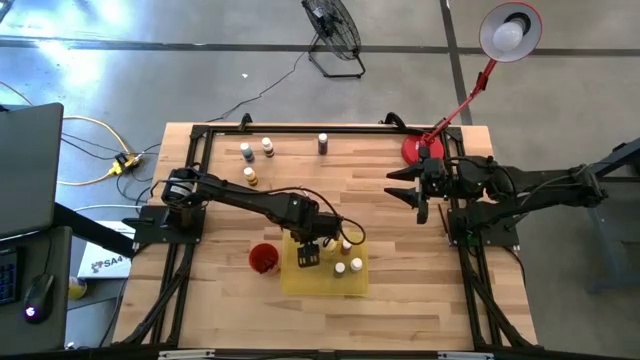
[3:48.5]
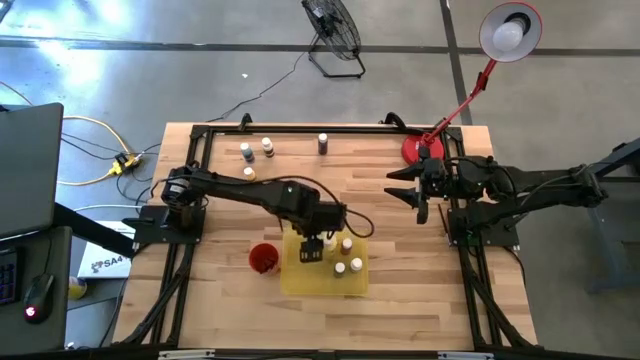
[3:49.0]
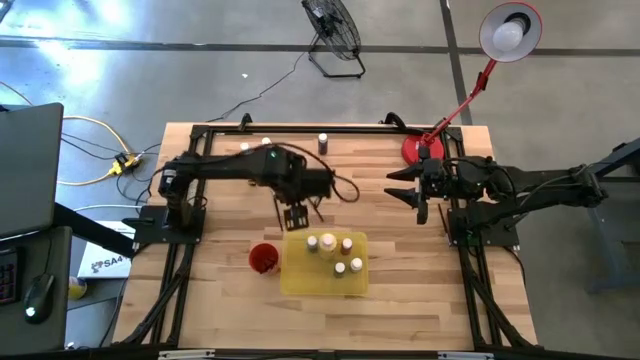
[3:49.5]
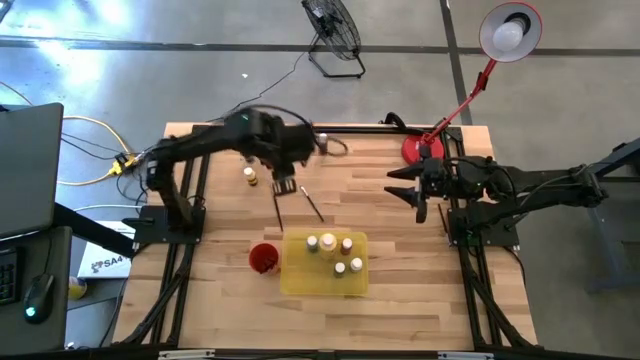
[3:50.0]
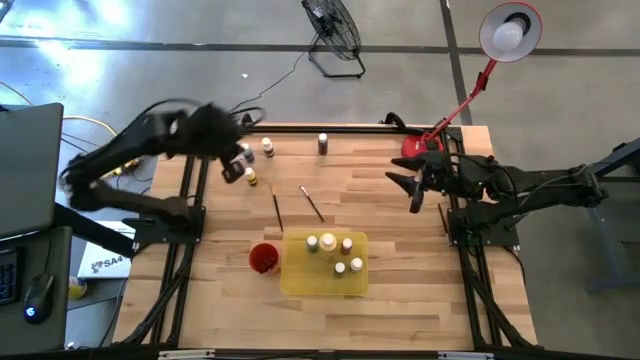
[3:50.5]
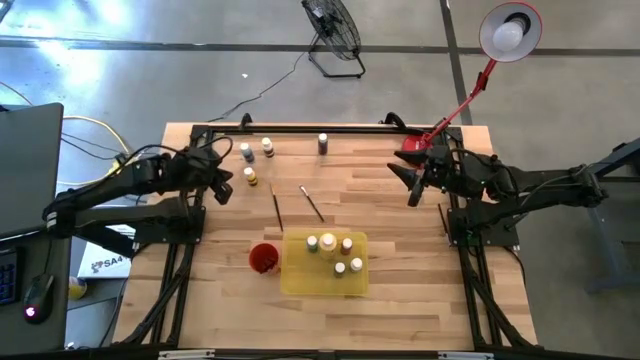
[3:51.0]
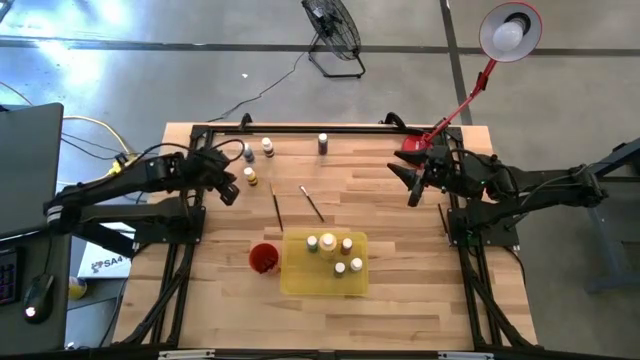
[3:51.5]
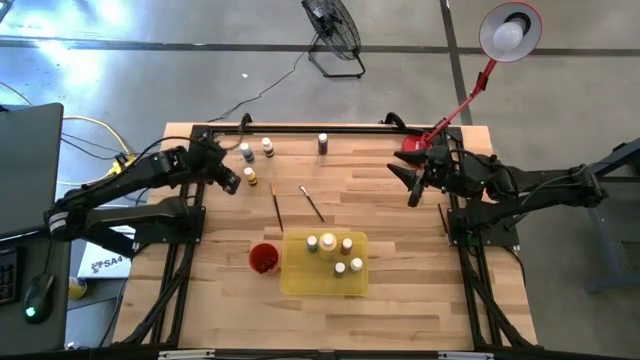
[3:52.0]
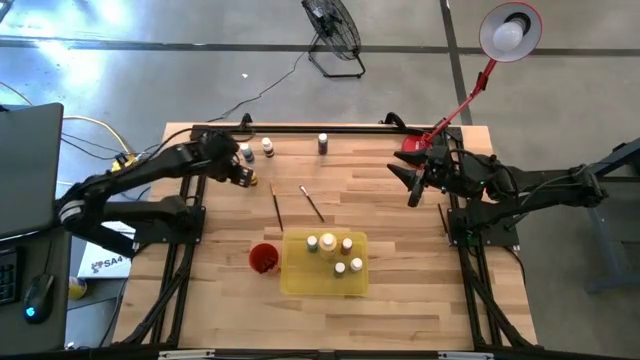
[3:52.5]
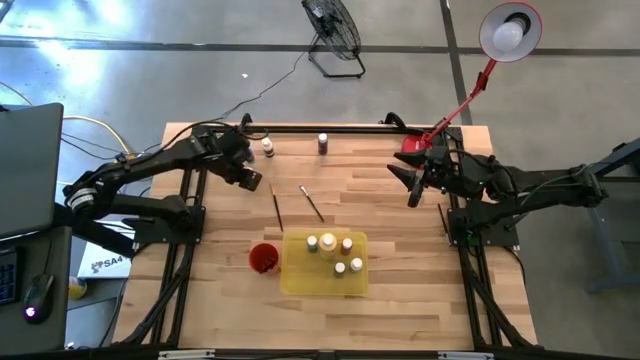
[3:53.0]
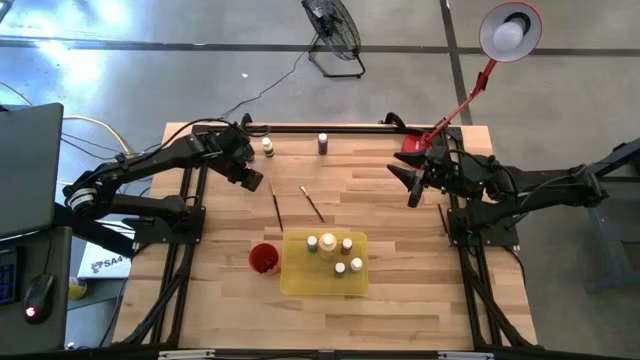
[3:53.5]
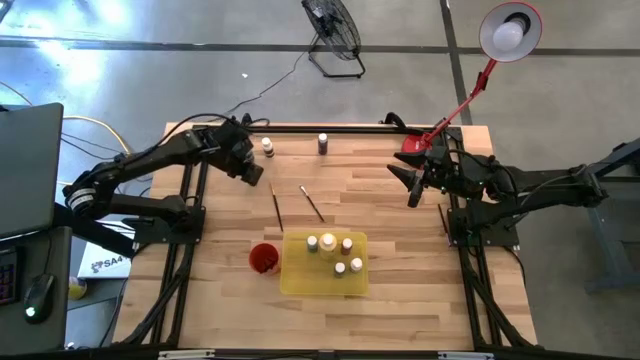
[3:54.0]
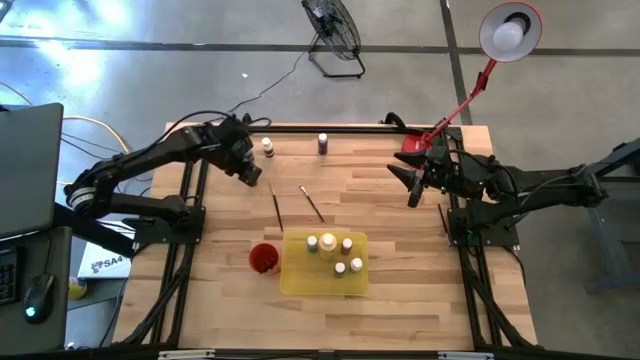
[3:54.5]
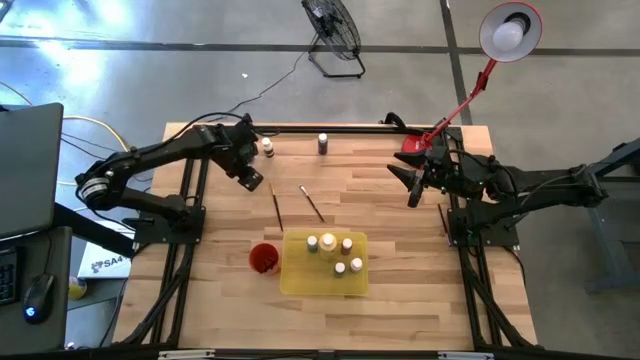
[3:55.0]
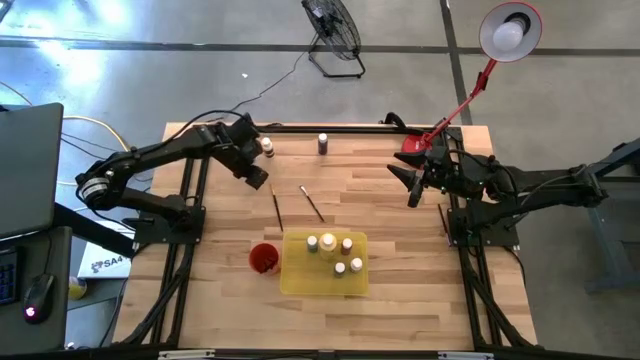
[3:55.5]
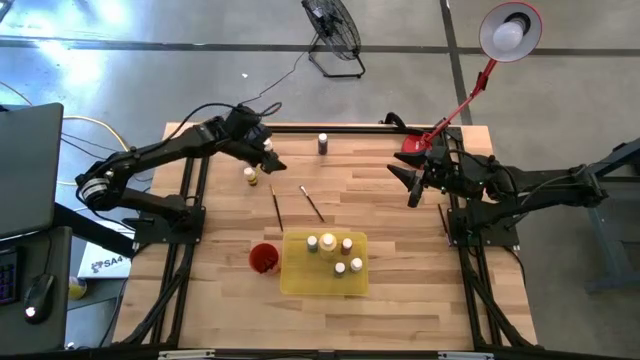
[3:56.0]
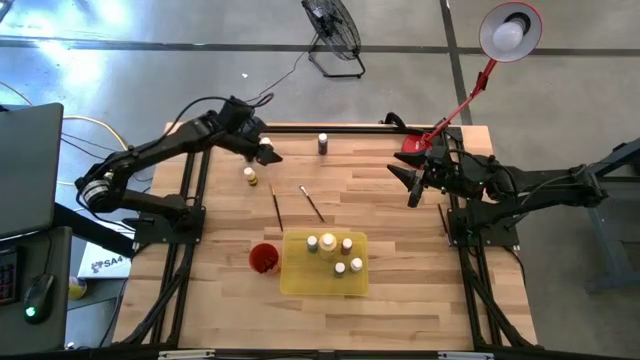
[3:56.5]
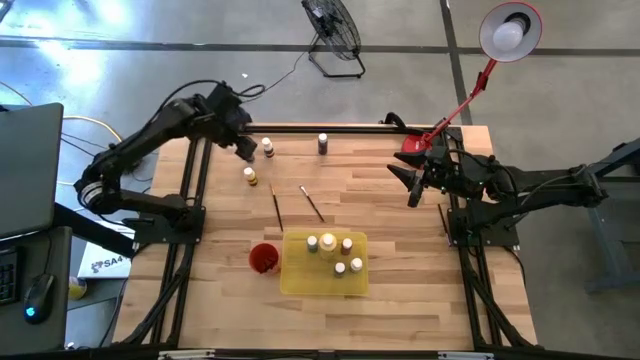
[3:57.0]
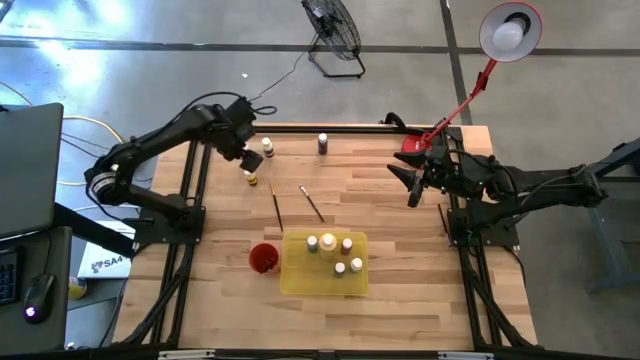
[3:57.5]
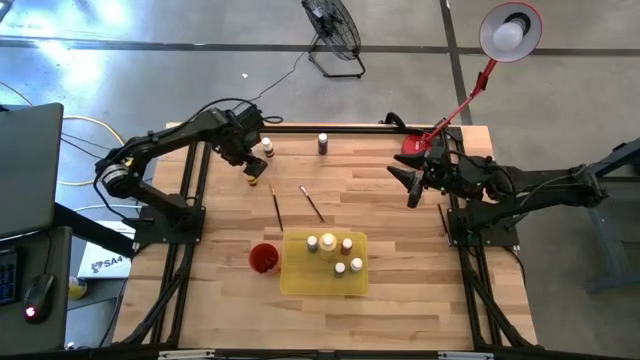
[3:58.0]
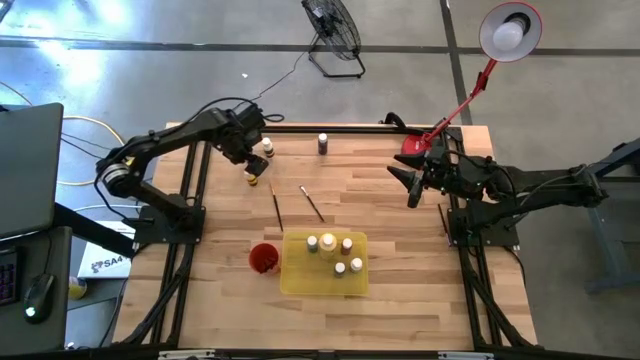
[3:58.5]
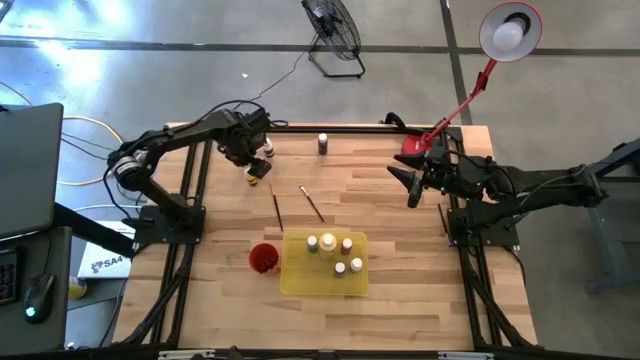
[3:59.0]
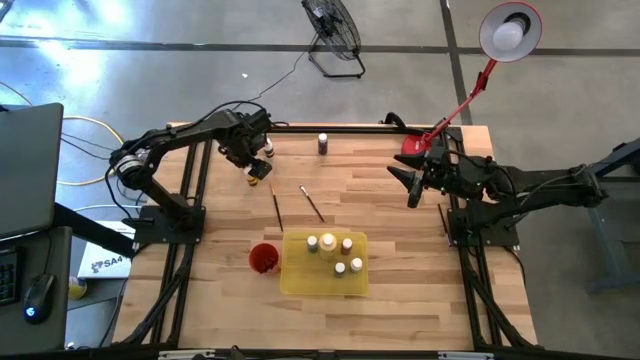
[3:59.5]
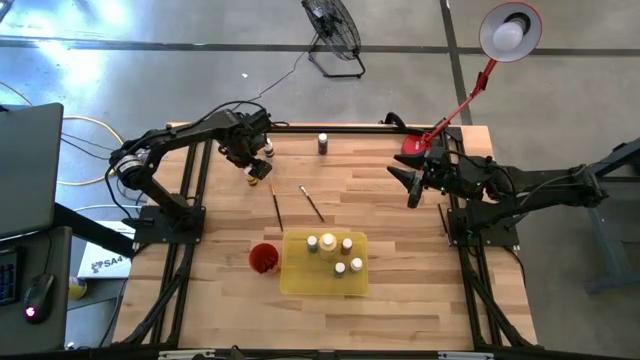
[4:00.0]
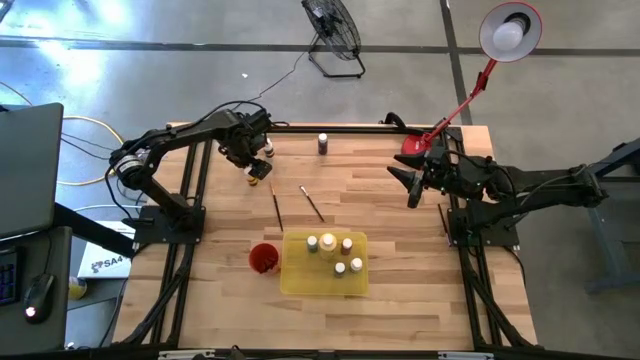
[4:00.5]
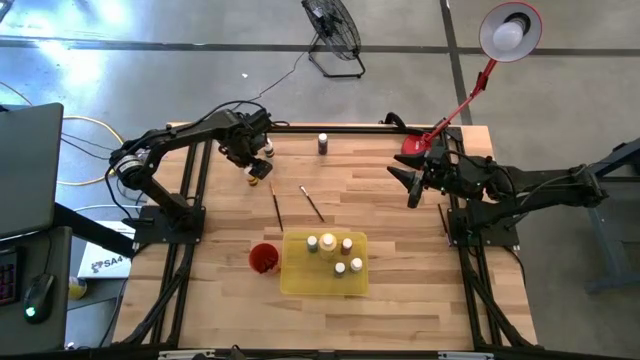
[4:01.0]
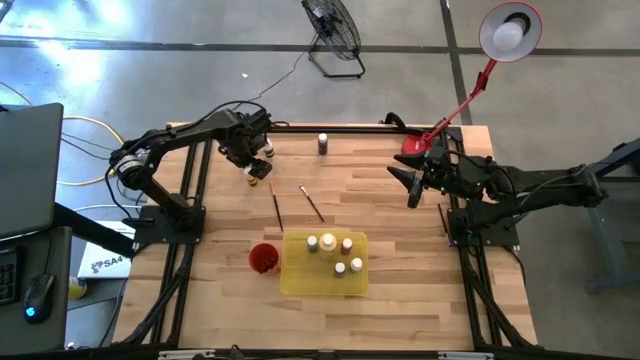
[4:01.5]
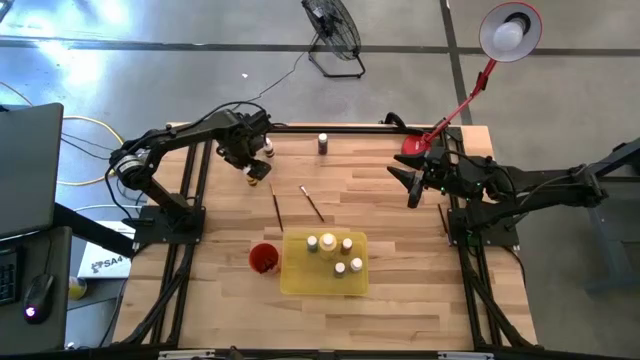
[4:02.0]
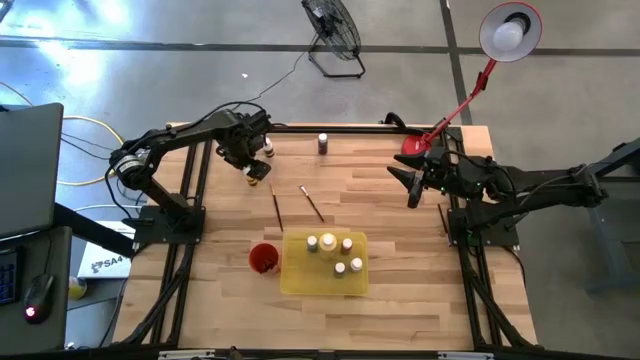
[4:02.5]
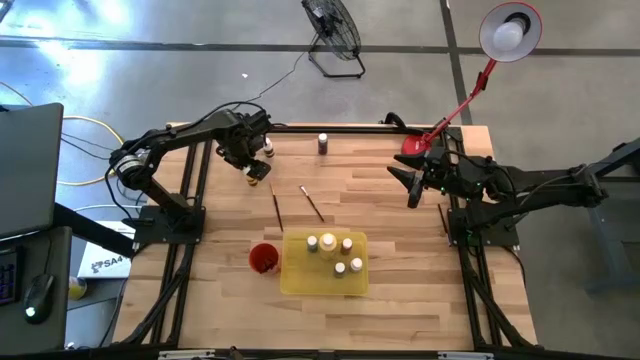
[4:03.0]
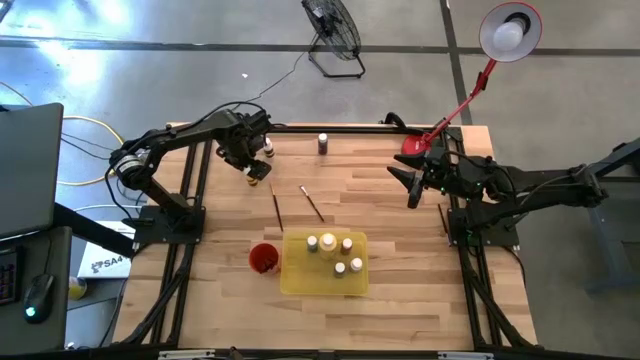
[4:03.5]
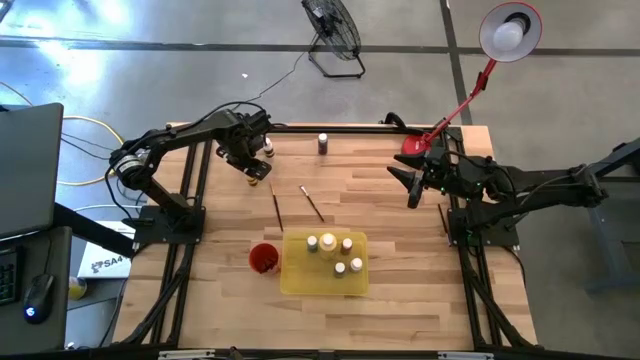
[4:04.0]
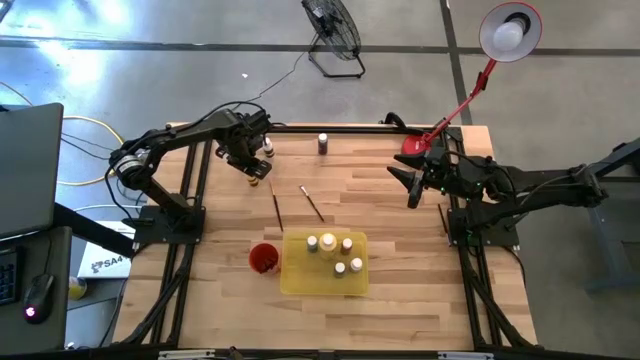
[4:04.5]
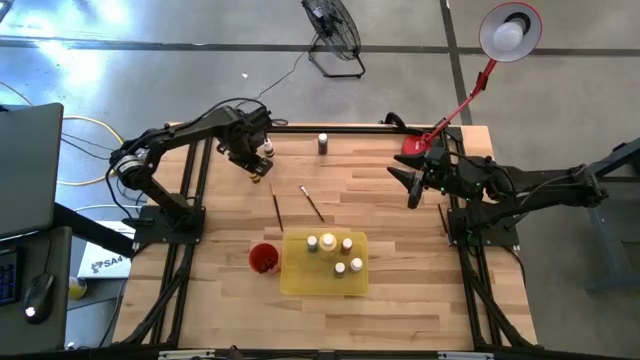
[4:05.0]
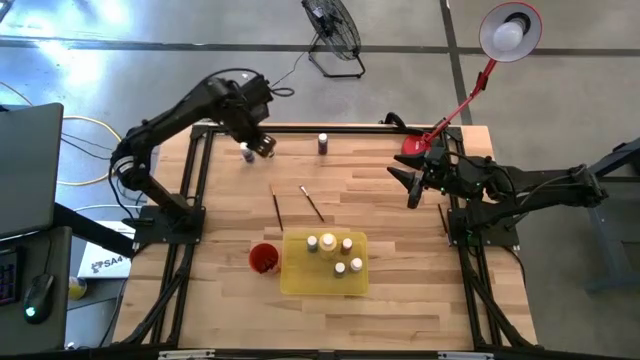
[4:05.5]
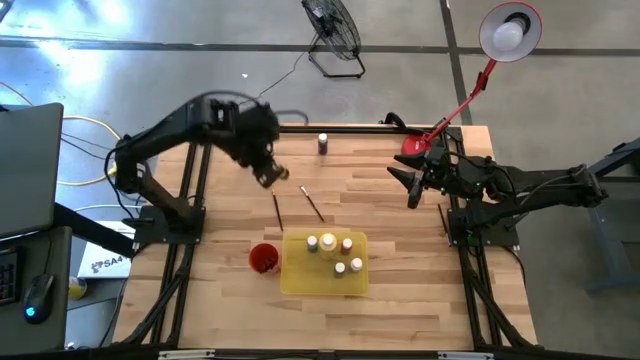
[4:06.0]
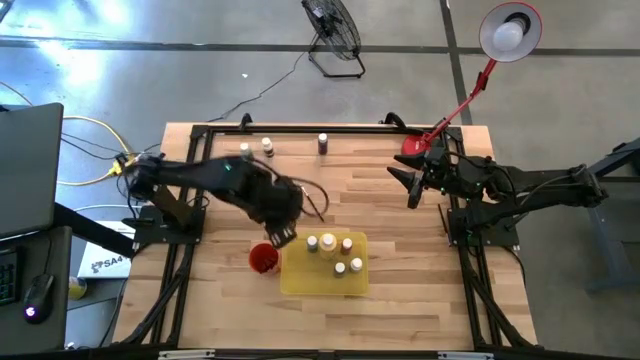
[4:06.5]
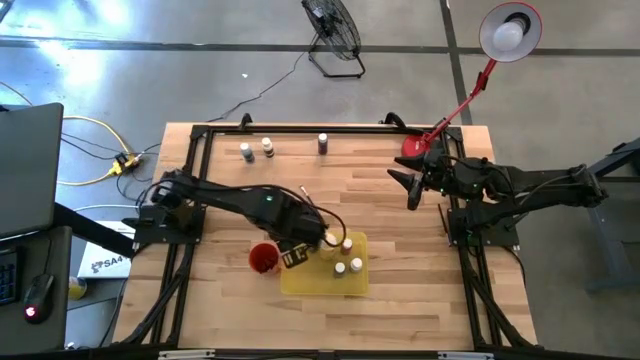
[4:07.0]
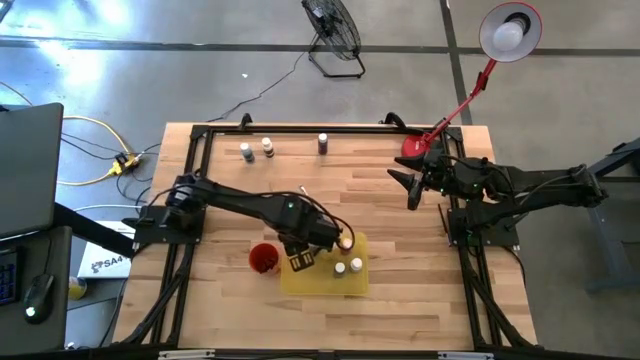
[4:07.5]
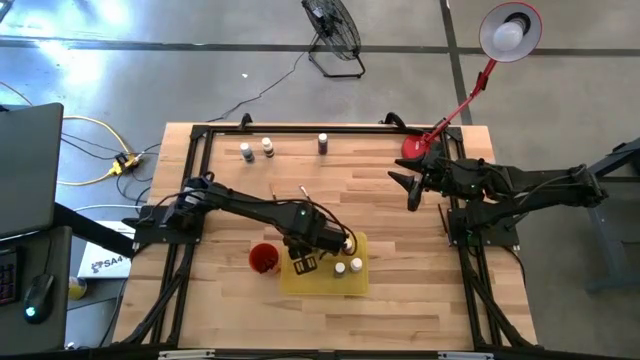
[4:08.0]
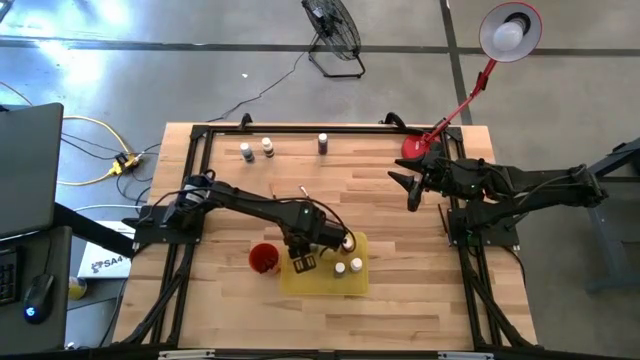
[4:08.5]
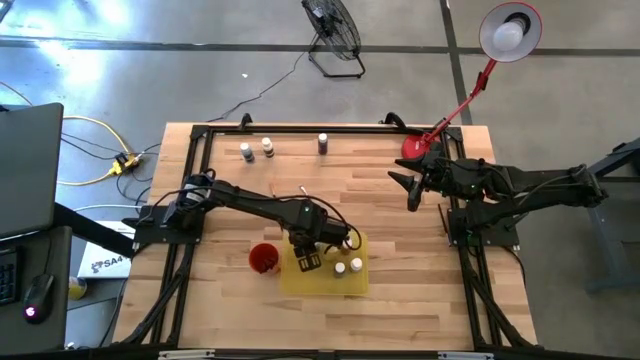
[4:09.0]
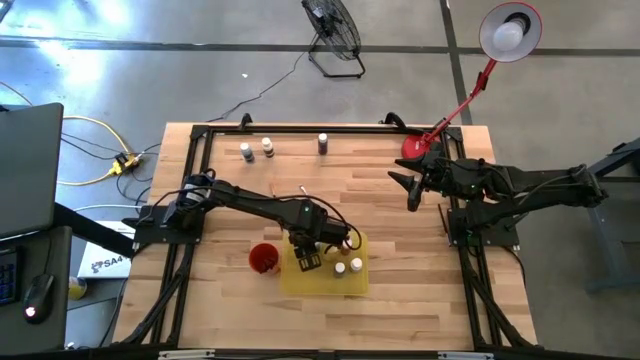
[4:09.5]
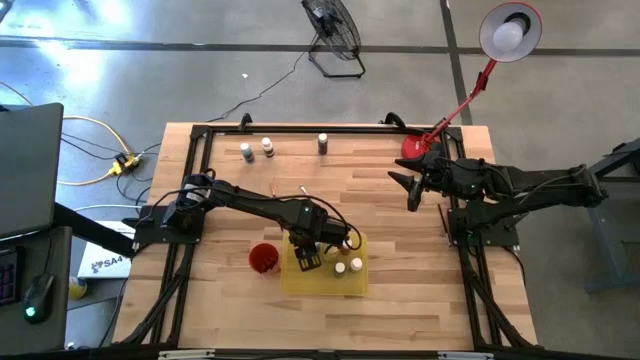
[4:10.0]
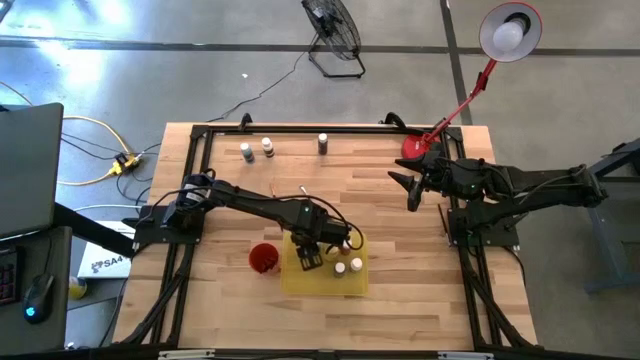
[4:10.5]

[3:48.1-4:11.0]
Task: Pick & Place Paint Supplies
Put the yellow paint bottle into the yellow bin
